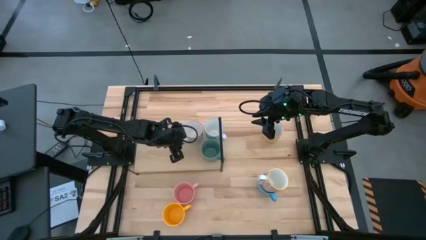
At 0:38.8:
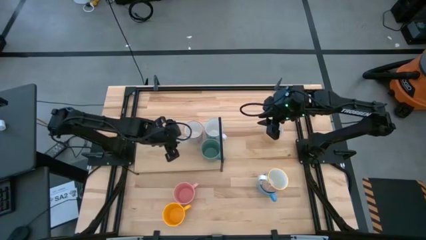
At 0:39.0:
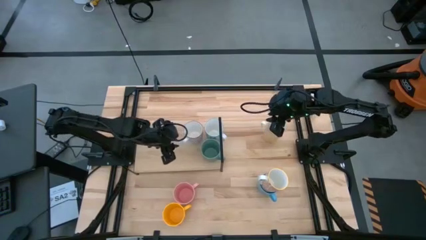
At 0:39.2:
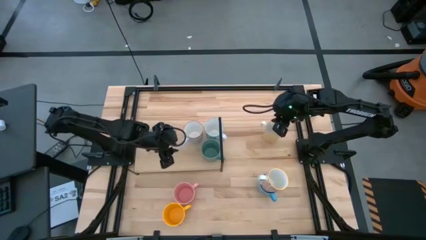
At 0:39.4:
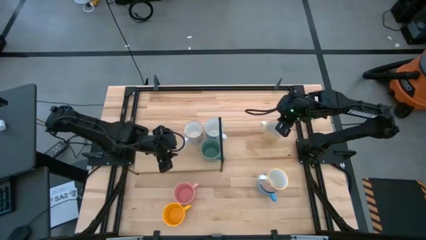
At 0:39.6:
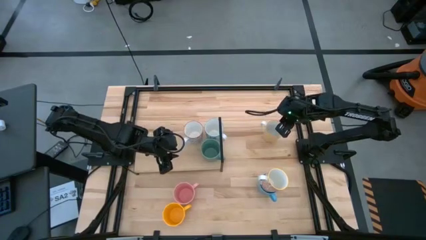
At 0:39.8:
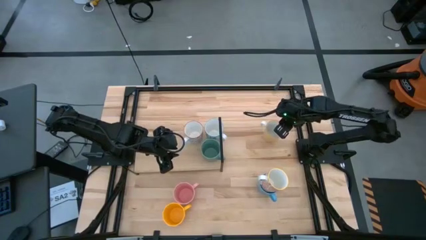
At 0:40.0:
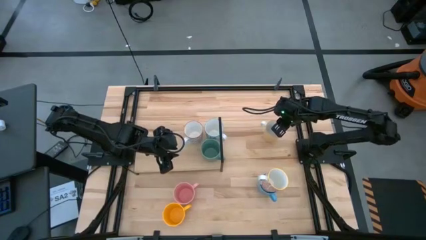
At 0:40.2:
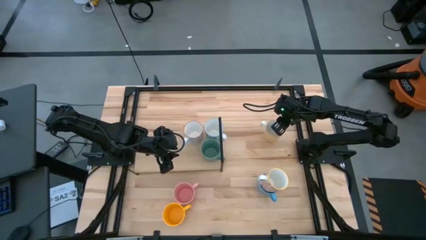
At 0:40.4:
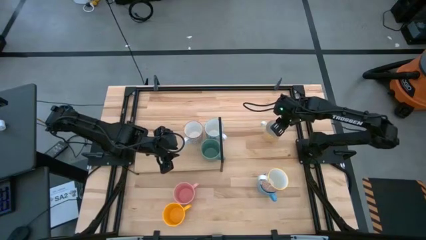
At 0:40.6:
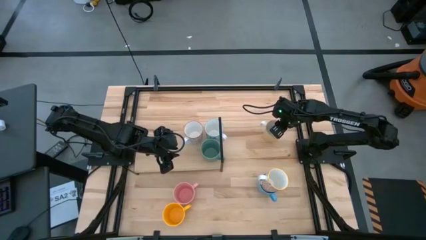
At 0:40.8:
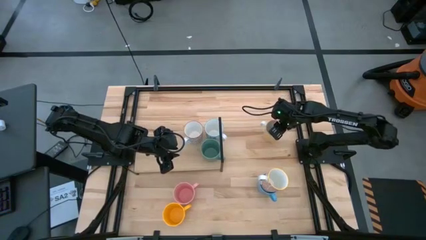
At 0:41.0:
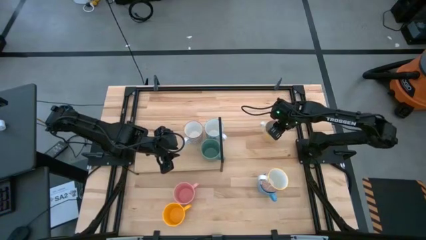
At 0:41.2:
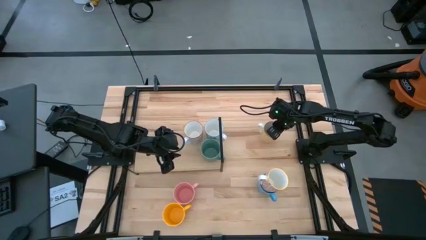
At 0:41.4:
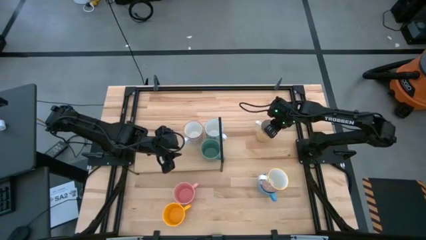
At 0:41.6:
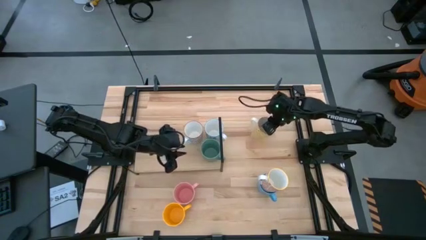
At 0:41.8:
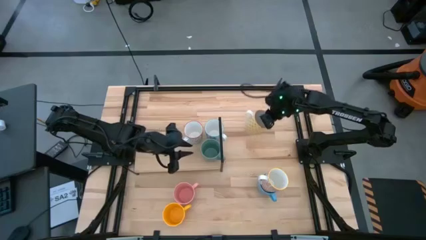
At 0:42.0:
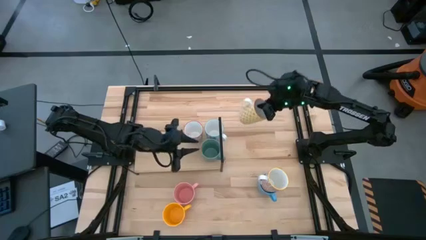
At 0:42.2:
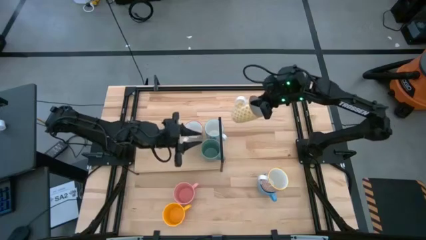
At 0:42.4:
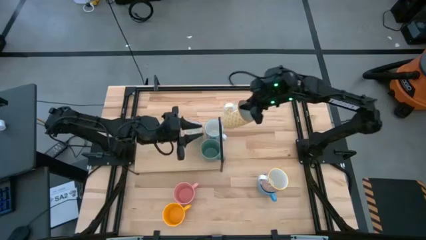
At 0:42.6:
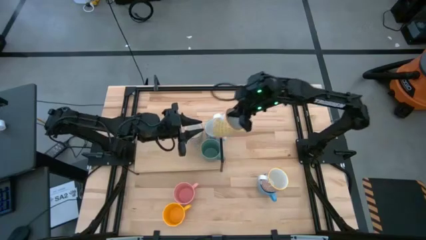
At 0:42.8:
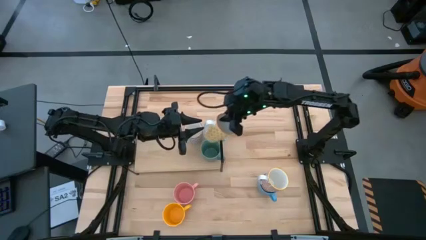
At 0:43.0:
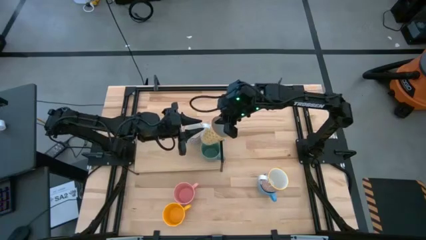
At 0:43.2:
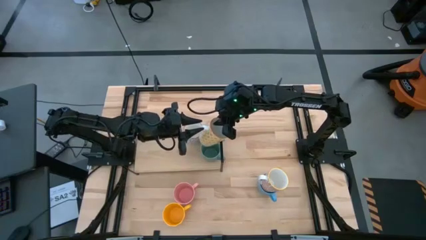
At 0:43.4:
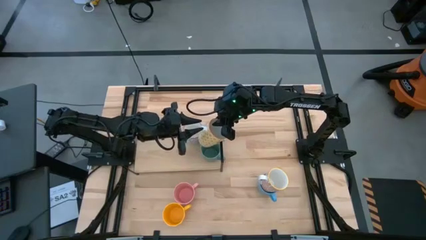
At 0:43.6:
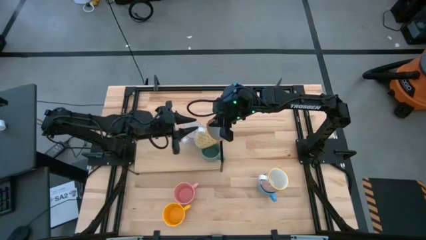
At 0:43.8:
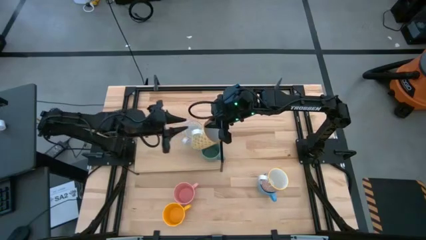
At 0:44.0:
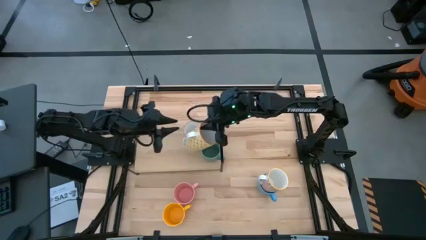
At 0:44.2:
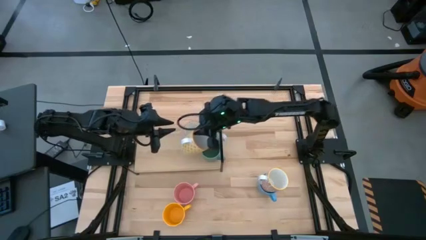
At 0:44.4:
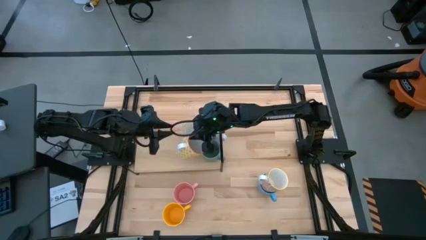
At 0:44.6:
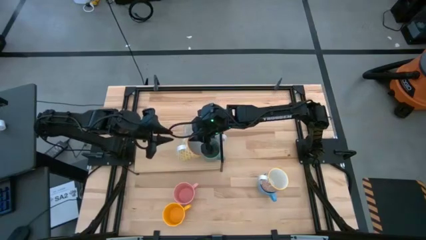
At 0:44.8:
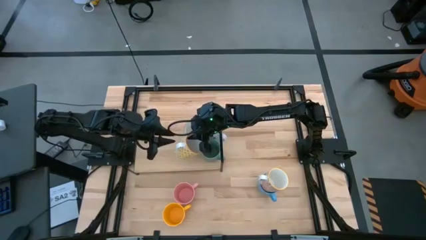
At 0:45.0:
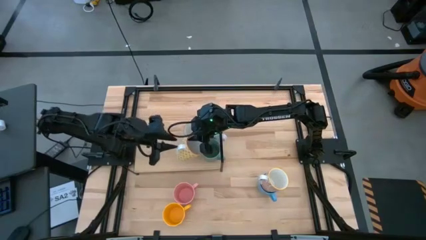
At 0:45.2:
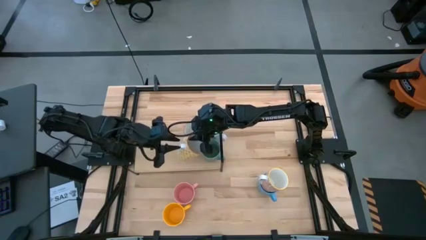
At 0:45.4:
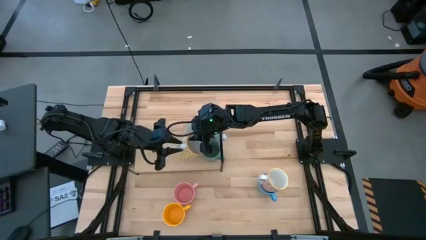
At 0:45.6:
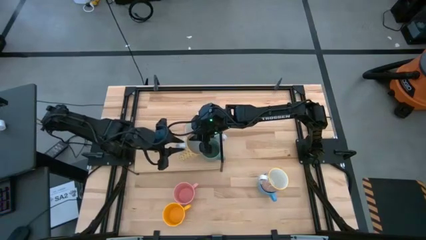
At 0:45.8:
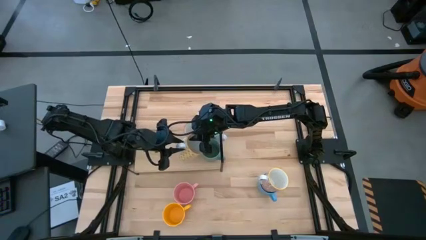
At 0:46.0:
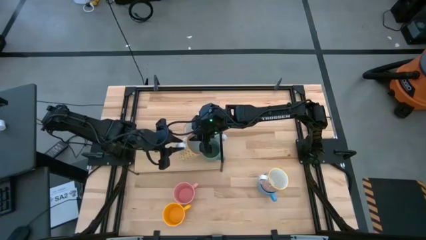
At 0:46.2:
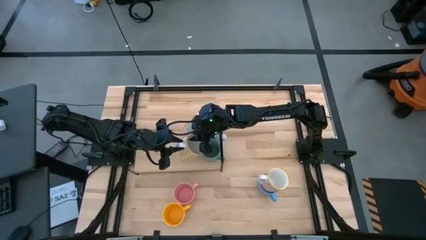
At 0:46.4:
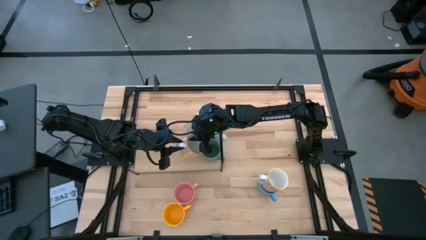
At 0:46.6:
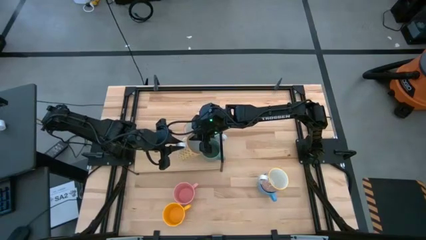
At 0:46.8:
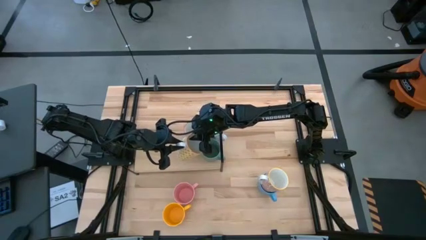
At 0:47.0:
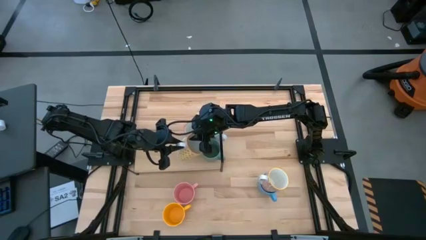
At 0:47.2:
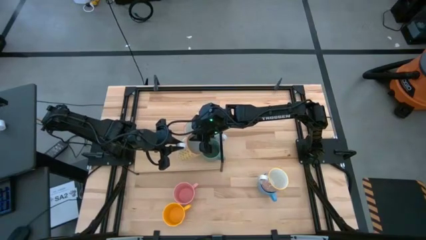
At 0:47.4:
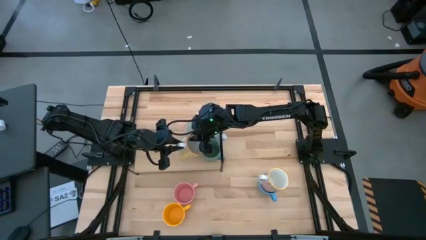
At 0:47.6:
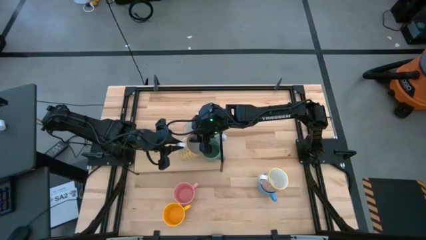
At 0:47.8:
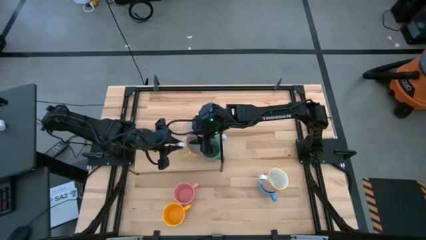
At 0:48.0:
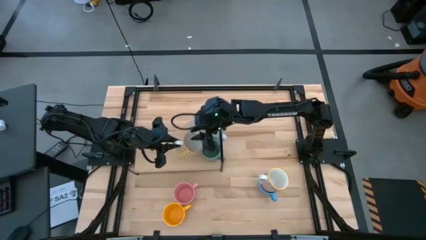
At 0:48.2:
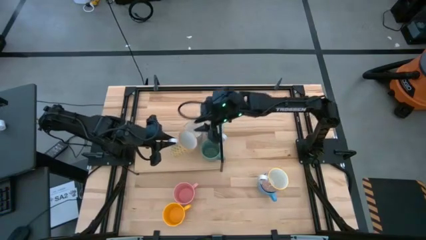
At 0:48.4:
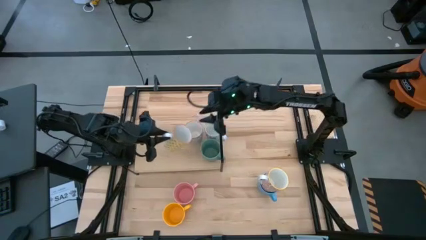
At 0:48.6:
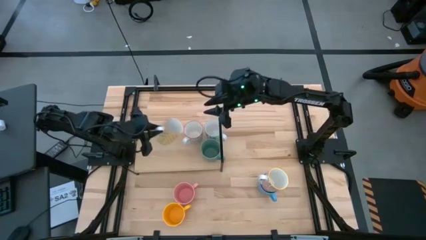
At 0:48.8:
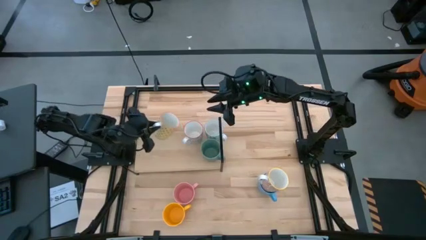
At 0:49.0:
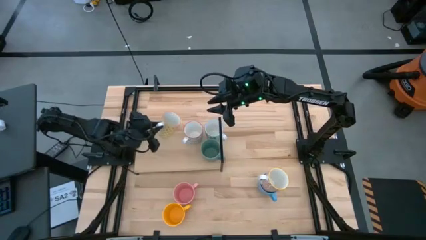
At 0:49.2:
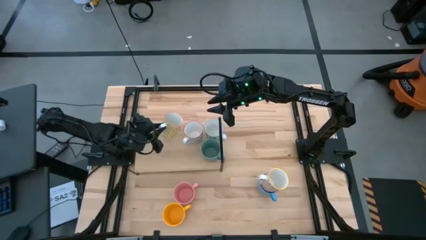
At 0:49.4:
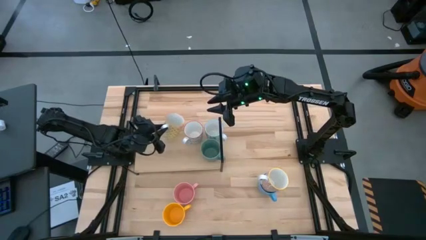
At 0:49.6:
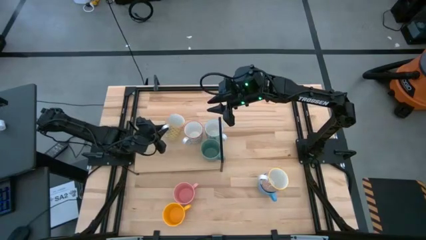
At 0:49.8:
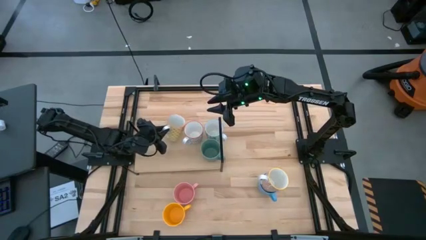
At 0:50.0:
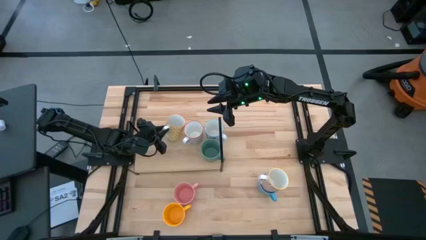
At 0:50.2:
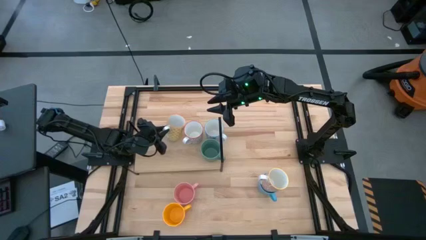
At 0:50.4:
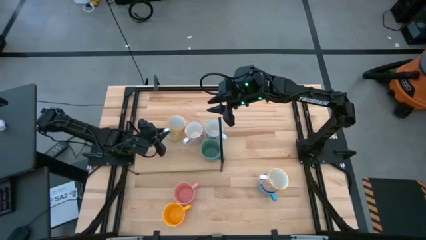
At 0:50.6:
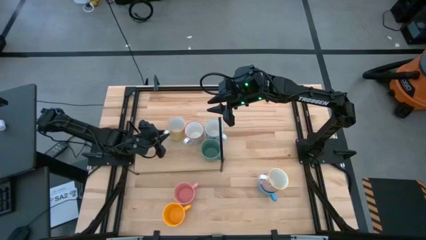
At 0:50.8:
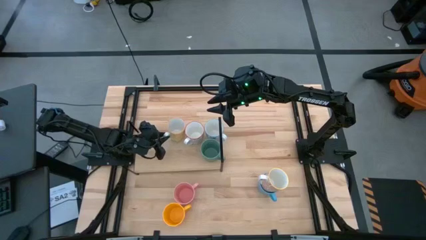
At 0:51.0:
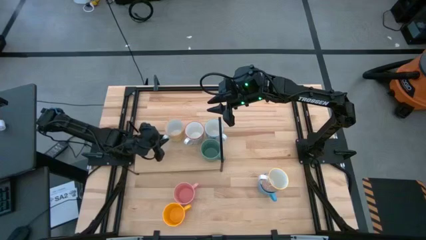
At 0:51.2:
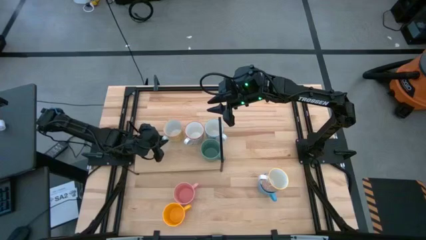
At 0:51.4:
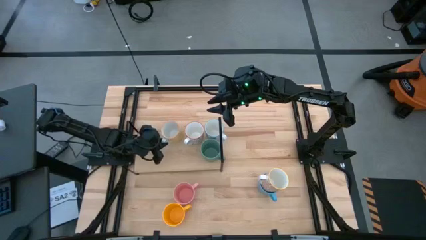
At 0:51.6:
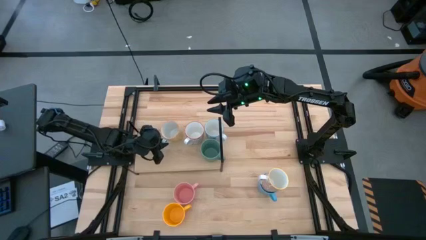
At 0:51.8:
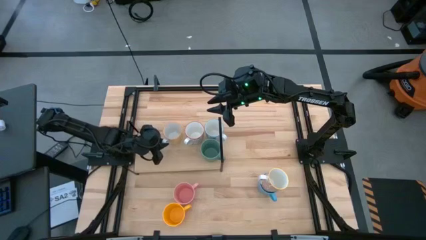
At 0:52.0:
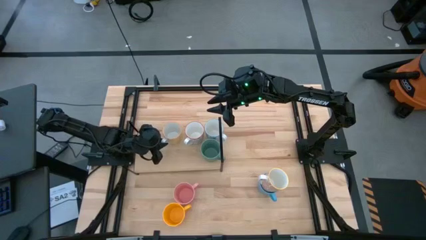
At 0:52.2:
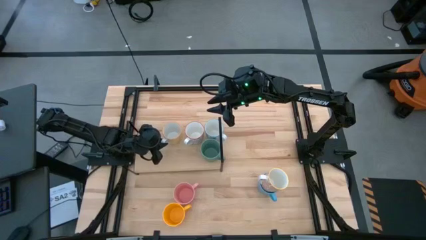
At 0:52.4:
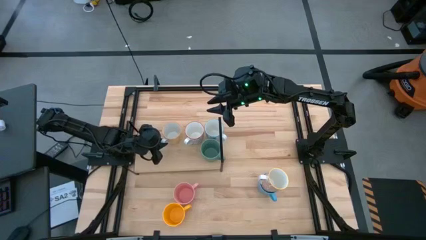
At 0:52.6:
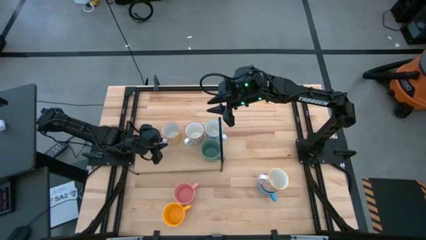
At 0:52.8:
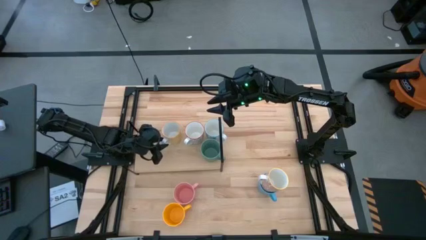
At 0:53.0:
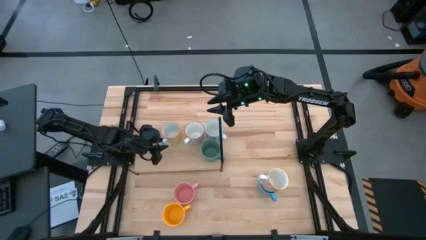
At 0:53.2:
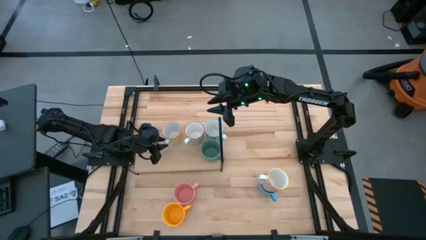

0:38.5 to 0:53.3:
Task: Place coffee mugs
Put the yellow patterned mug on the shelf
